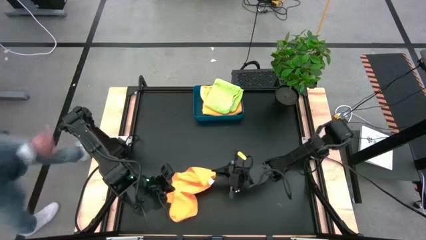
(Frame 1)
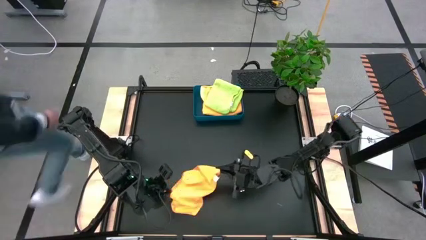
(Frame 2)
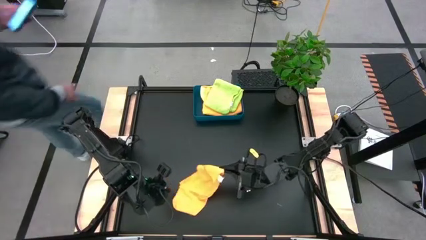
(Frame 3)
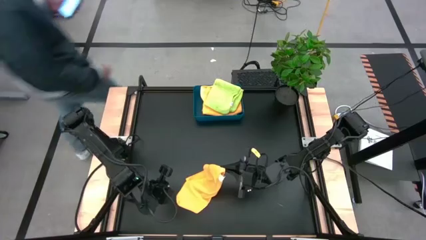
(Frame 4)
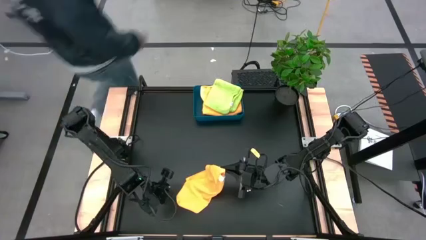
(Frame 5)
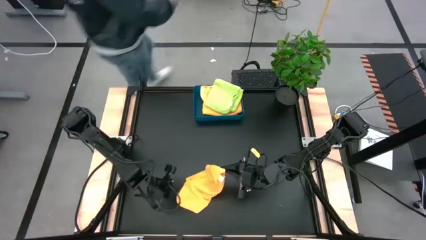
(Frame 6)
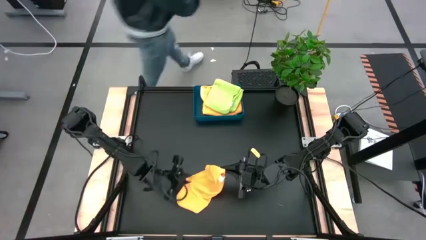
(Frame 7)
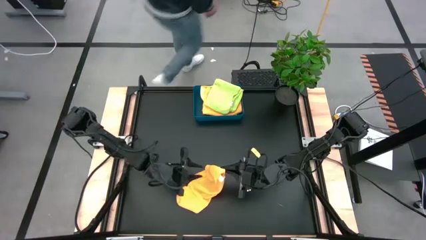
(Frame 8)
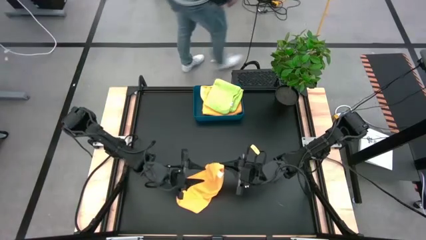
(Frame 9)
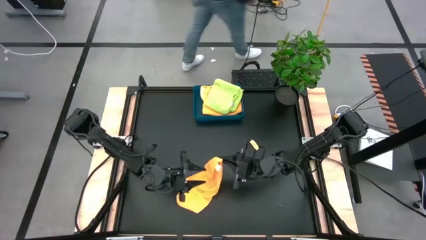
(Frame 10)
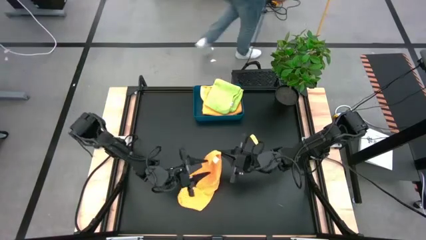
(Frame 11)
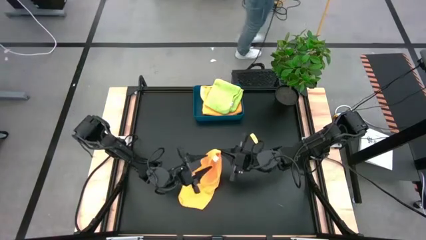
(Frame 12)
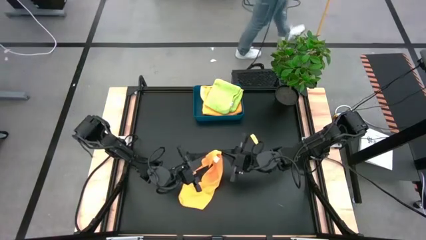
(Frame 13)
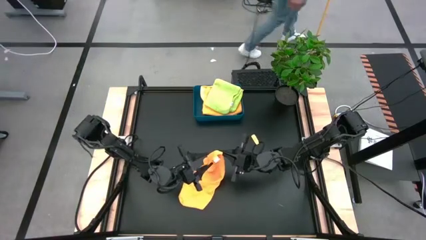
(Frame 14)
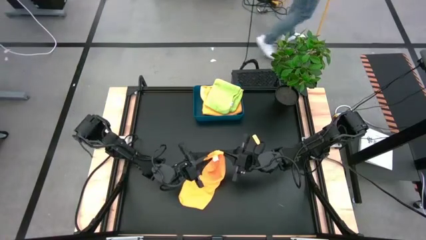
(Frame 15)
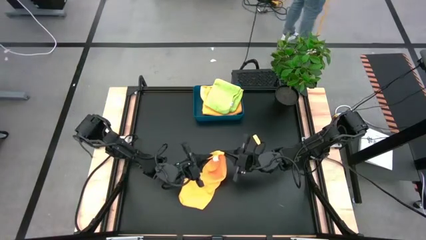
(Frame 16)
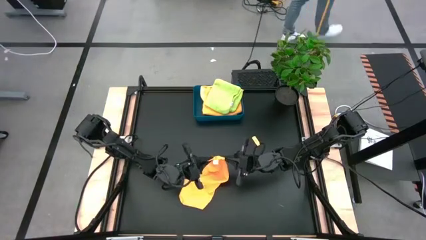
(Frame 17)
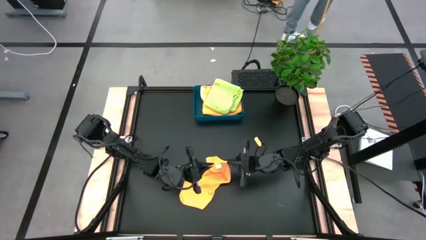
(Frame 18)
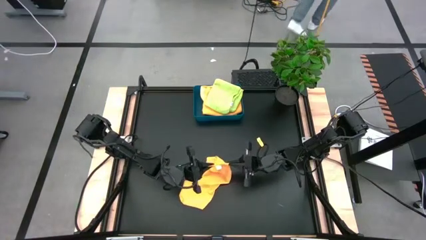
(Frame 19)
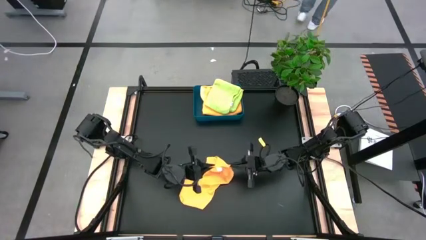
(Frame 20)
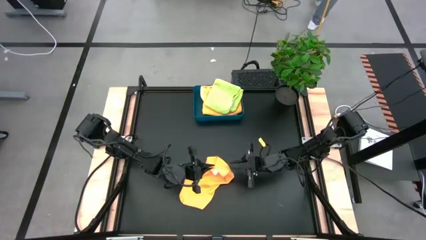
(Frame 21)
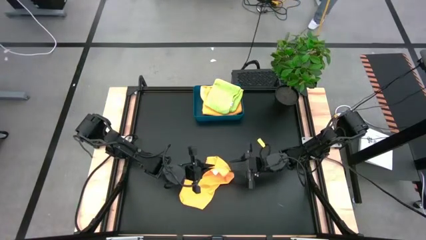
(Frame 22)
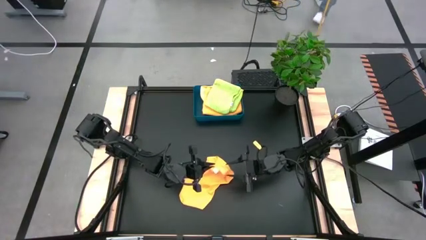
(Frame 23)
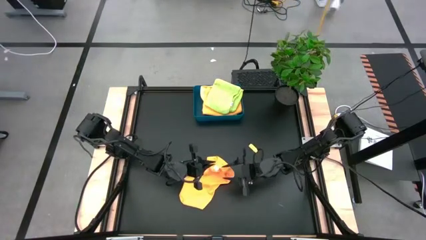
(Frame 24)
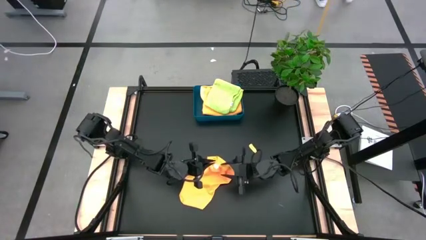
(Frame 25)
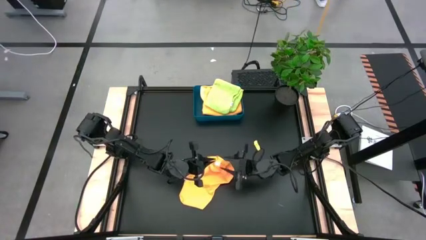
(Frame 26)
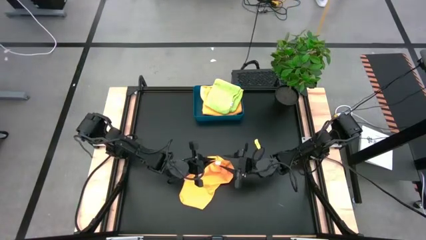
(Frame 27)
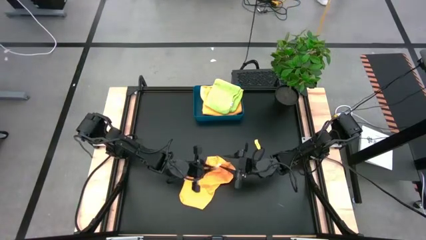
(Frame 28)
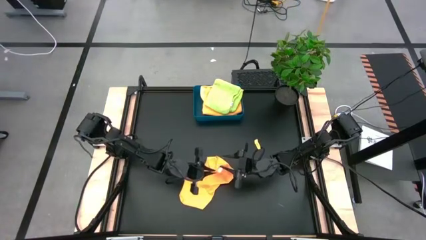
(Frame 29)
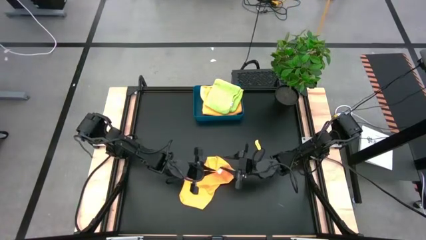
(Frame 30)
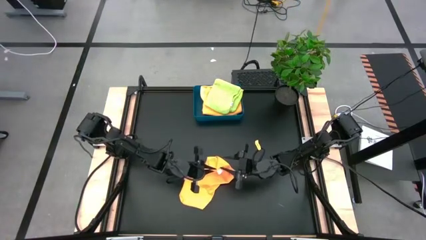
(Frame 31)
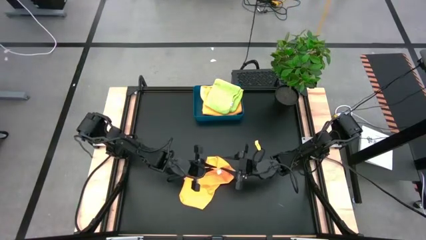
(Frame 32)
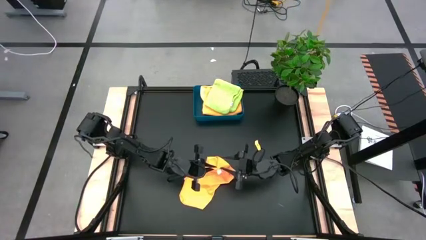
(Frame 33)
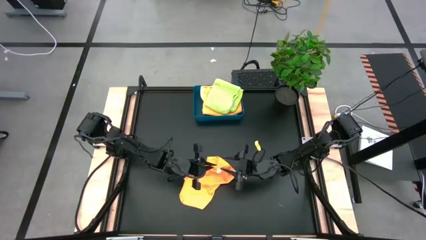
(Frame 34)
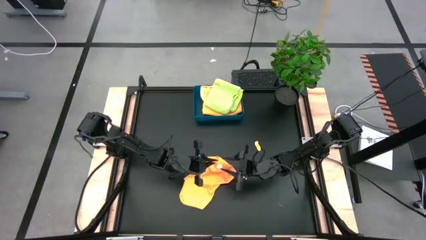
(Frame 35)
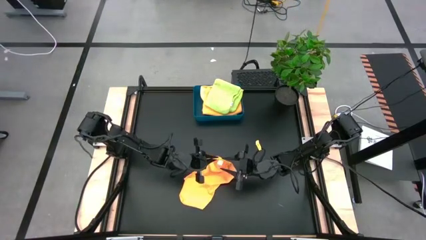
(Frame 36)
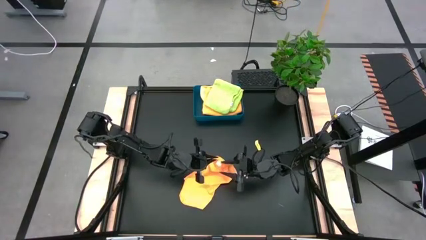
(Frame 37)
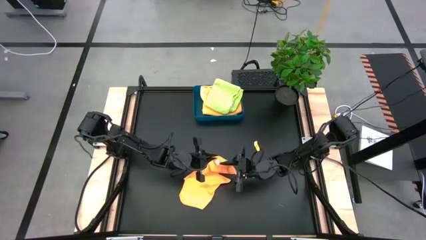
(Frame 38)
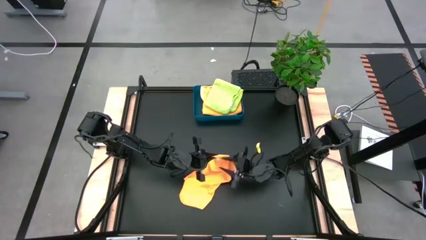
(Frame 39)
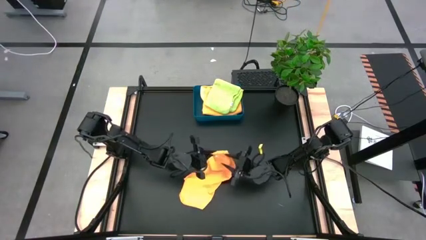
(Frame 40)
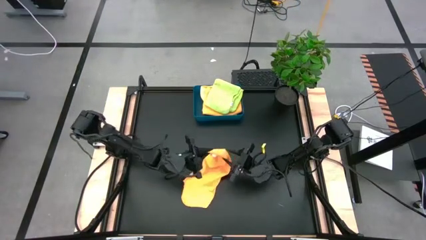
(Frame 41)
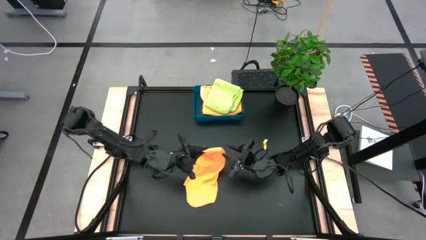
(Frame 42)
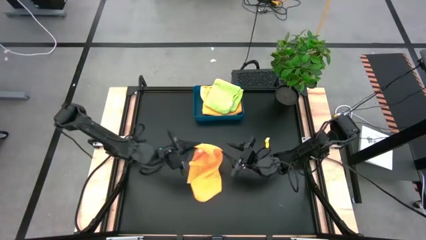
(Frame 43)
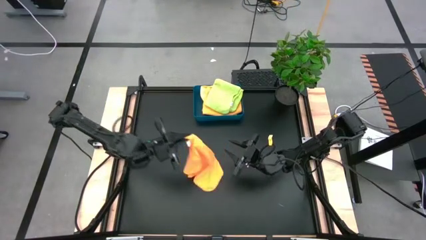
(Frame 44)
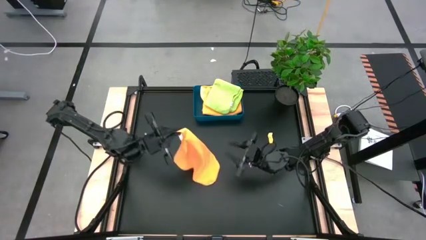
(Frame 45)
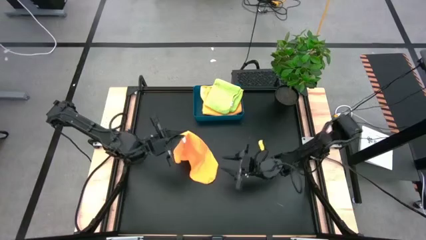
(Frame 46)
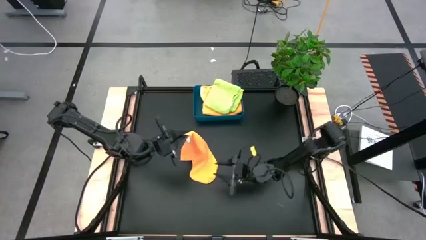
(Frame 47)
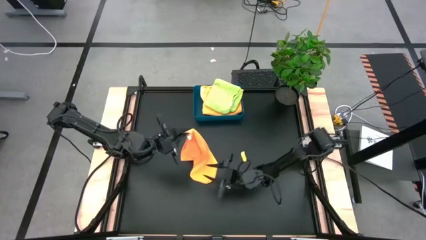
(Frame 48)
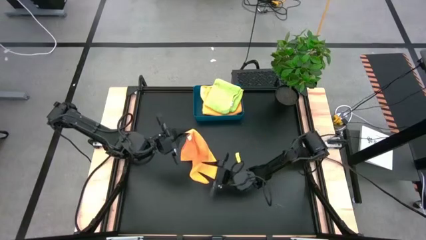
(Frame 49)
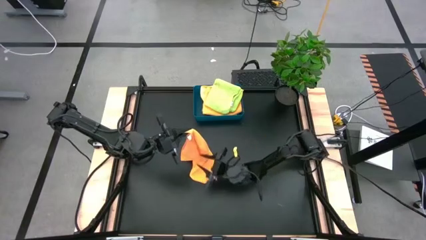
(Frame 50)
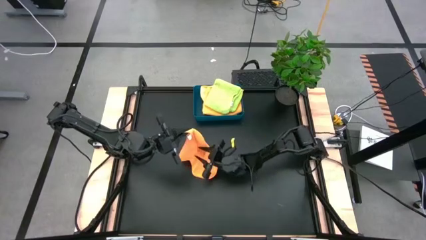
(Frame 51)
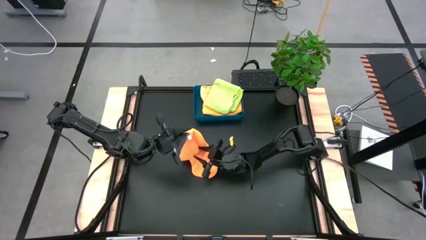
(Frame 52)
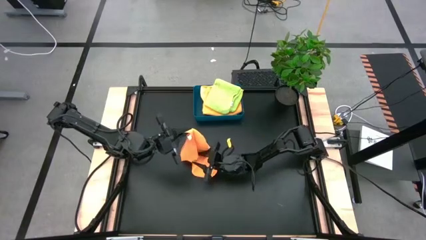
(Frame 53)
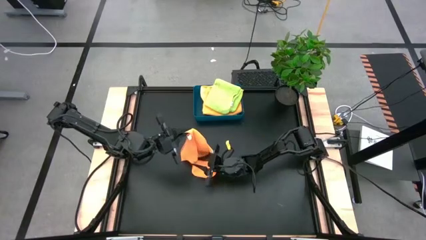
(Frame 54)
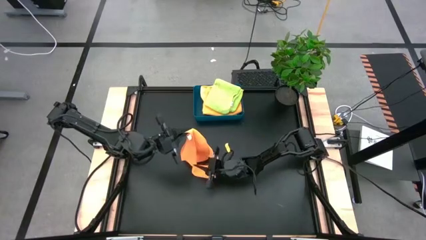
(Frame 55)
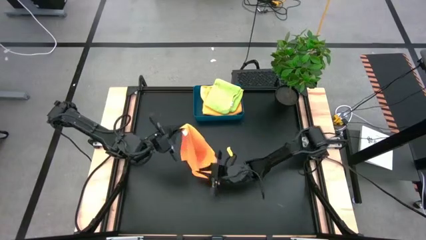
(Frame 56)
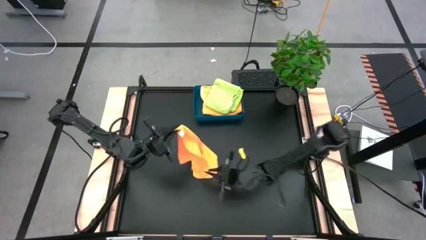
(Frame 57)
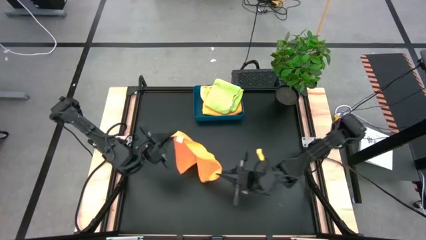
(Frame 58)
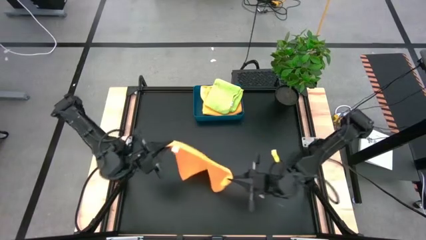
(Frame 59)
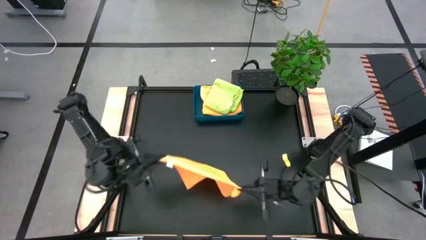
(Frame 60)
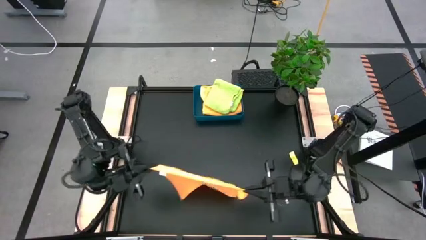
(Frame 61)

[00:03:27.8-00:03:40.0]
Task: Fold microfiber towels
Fold the orange microfiber cloth
